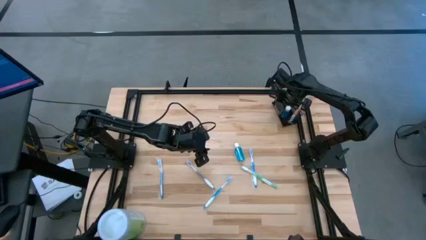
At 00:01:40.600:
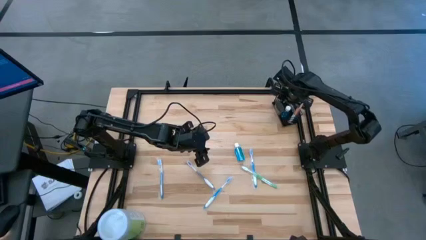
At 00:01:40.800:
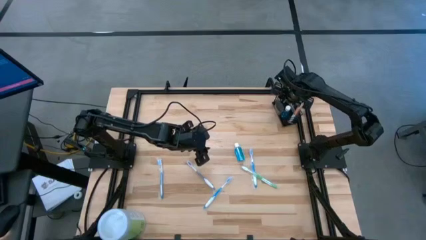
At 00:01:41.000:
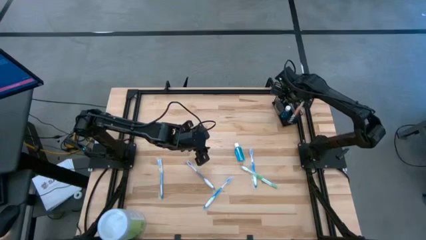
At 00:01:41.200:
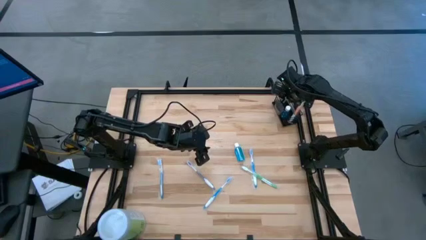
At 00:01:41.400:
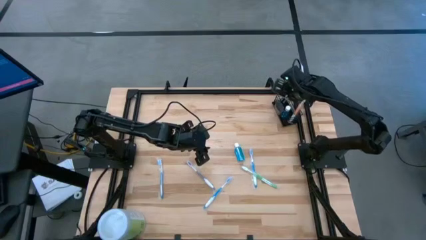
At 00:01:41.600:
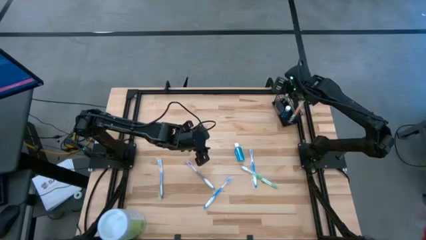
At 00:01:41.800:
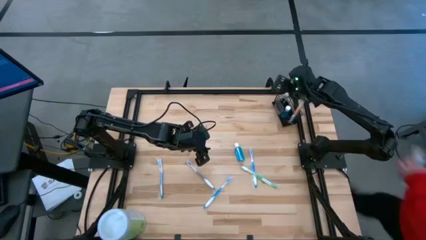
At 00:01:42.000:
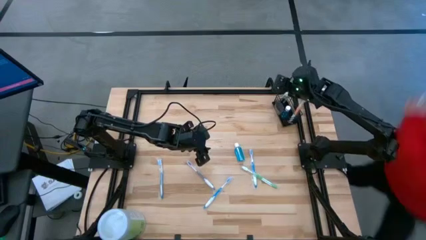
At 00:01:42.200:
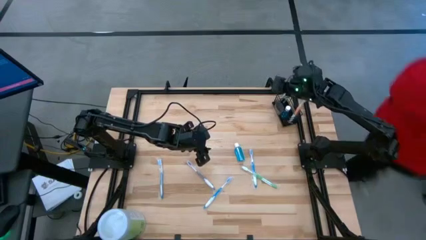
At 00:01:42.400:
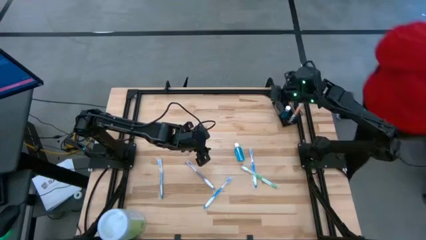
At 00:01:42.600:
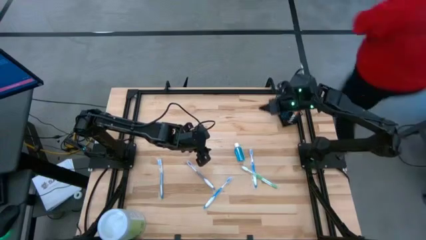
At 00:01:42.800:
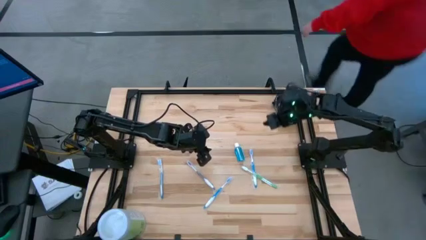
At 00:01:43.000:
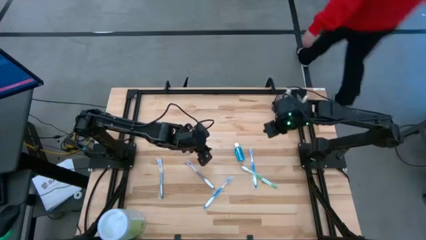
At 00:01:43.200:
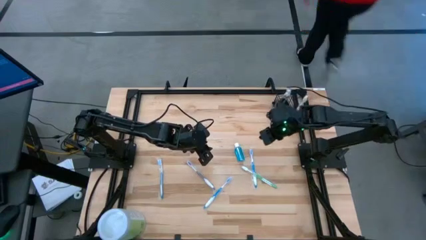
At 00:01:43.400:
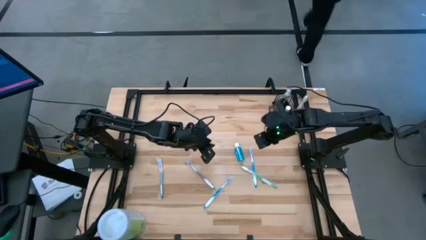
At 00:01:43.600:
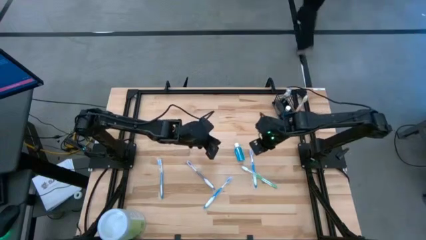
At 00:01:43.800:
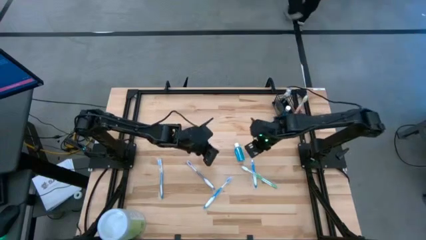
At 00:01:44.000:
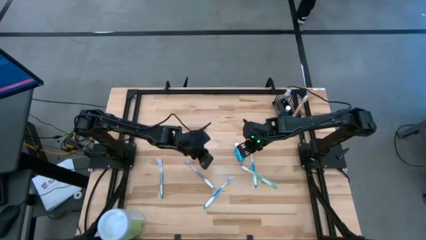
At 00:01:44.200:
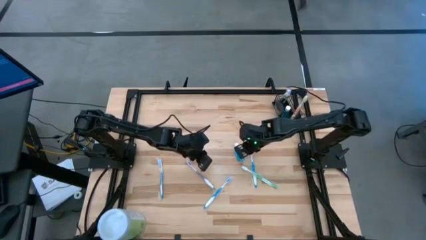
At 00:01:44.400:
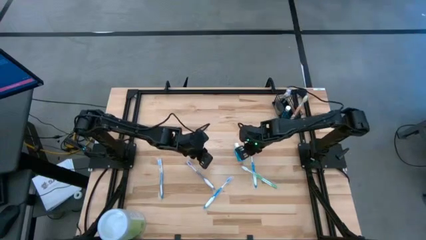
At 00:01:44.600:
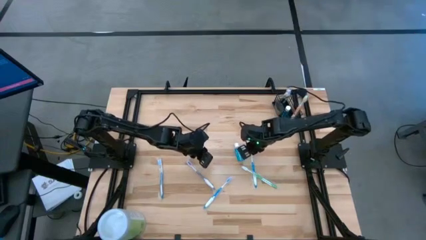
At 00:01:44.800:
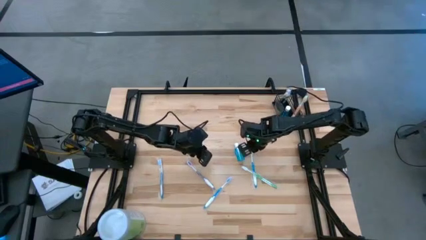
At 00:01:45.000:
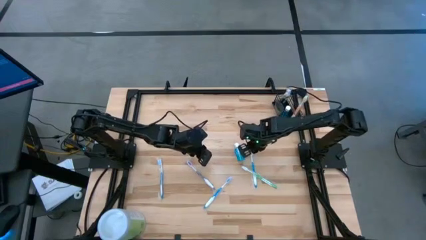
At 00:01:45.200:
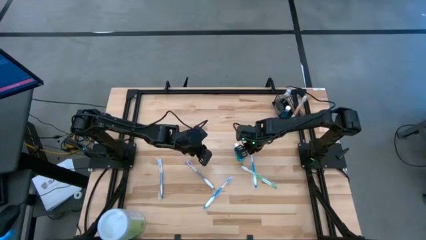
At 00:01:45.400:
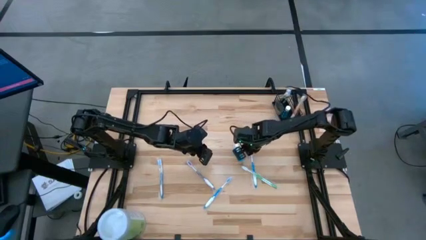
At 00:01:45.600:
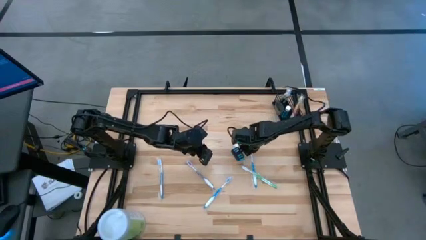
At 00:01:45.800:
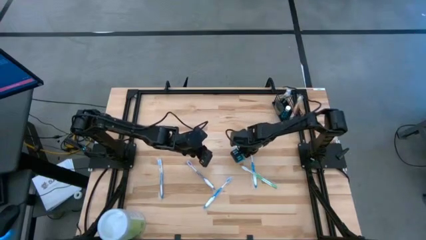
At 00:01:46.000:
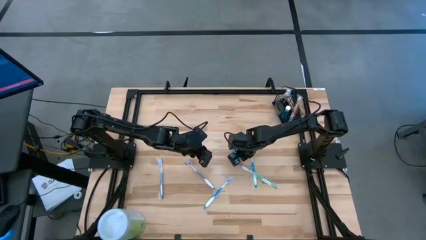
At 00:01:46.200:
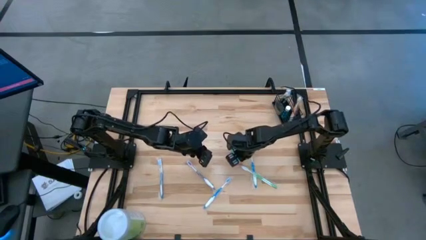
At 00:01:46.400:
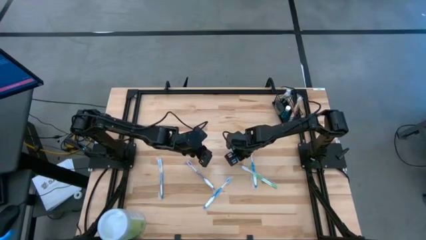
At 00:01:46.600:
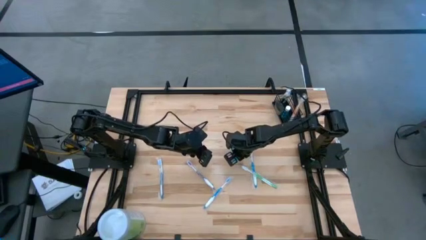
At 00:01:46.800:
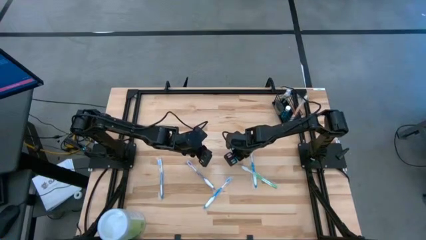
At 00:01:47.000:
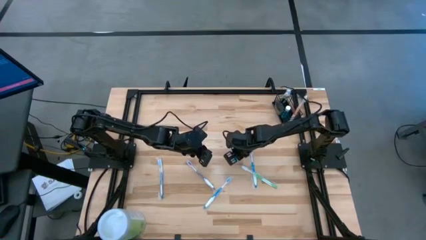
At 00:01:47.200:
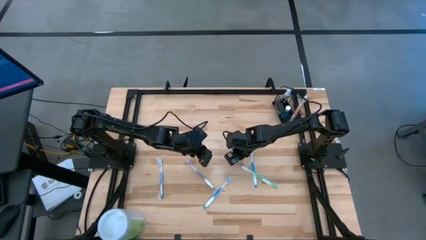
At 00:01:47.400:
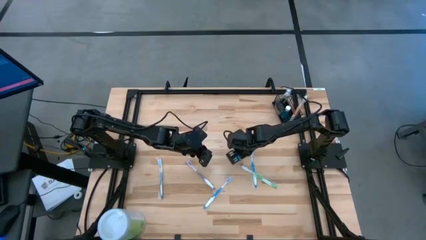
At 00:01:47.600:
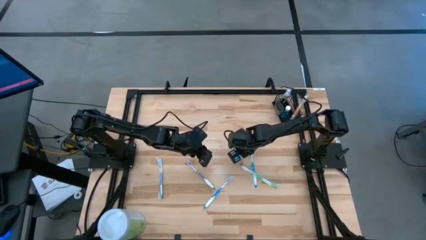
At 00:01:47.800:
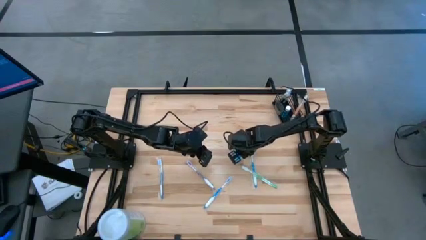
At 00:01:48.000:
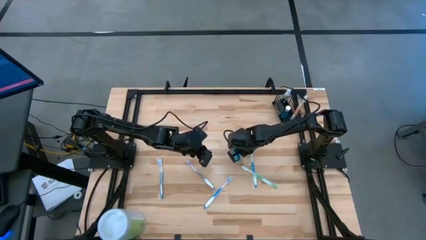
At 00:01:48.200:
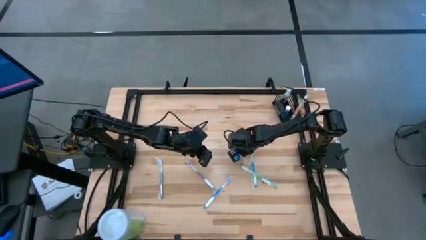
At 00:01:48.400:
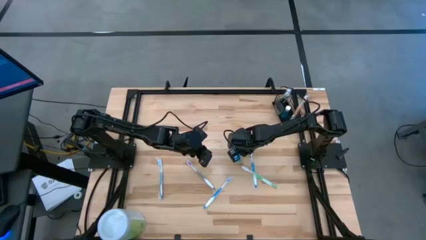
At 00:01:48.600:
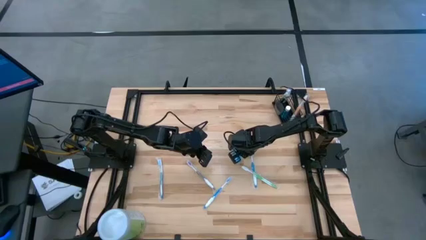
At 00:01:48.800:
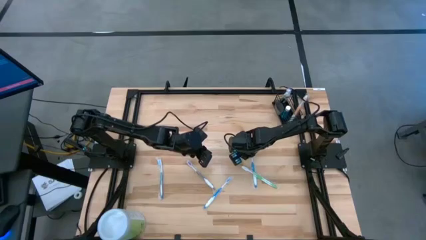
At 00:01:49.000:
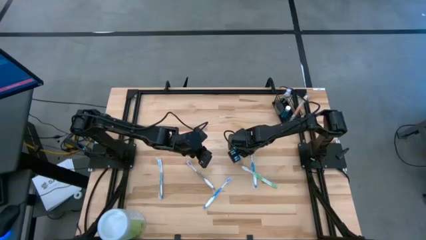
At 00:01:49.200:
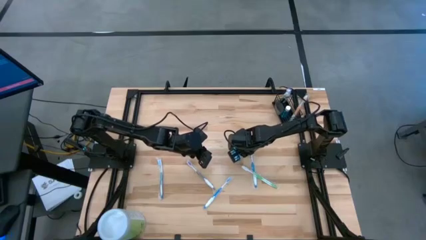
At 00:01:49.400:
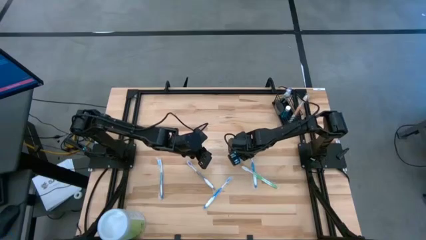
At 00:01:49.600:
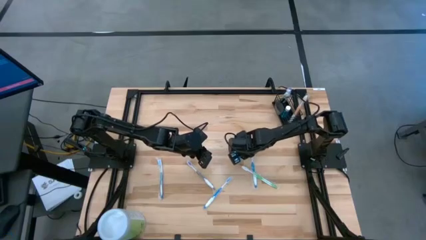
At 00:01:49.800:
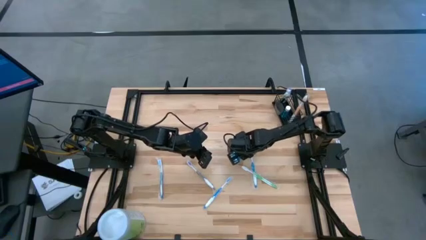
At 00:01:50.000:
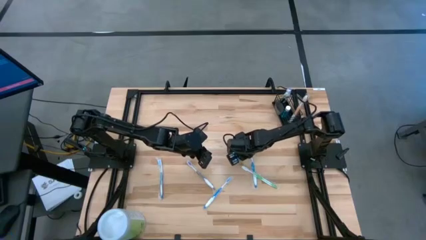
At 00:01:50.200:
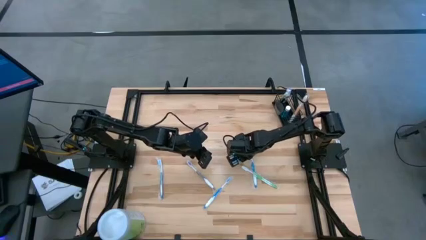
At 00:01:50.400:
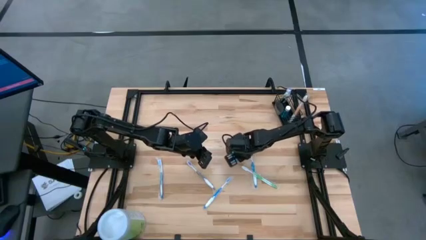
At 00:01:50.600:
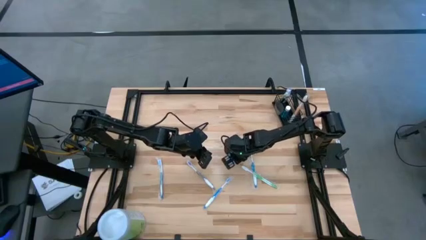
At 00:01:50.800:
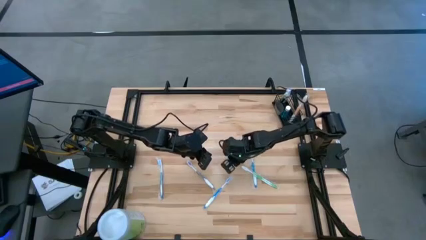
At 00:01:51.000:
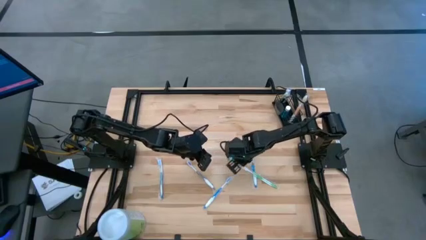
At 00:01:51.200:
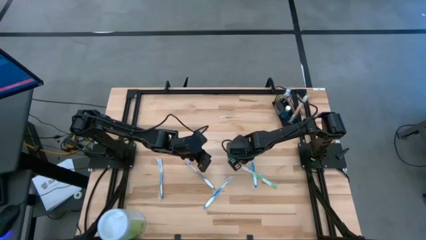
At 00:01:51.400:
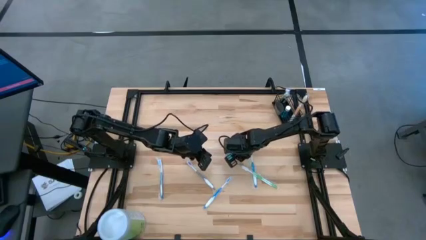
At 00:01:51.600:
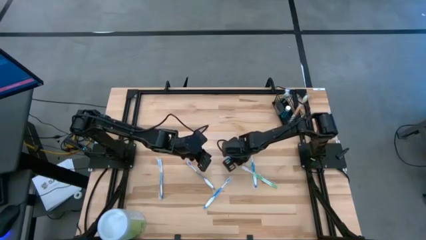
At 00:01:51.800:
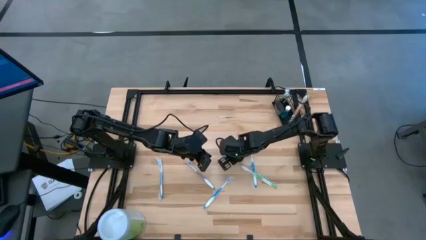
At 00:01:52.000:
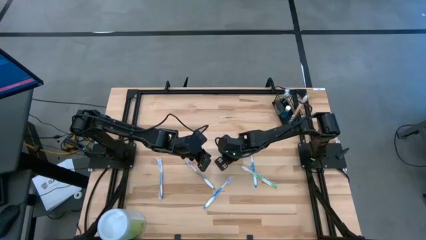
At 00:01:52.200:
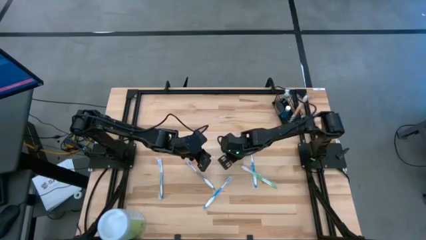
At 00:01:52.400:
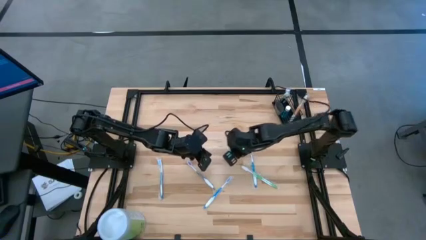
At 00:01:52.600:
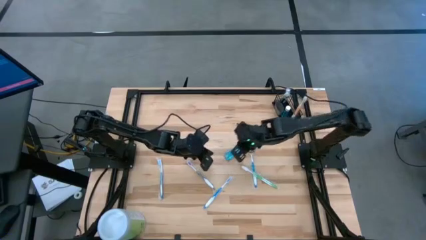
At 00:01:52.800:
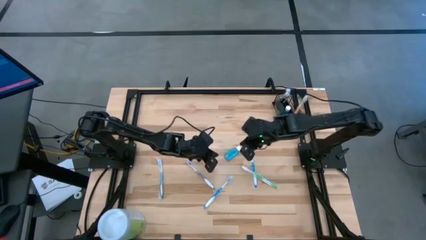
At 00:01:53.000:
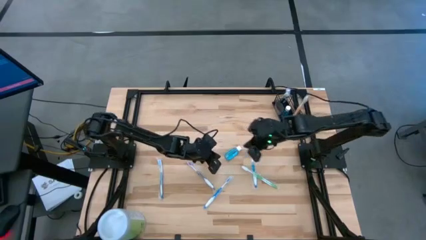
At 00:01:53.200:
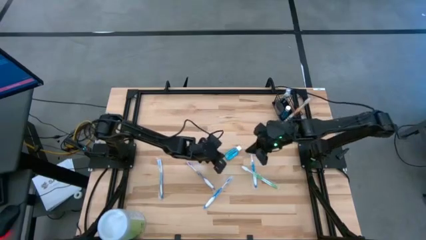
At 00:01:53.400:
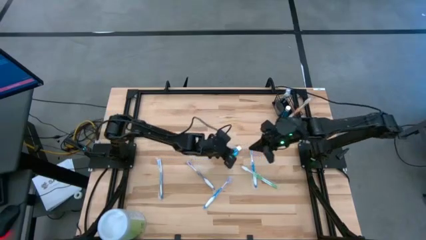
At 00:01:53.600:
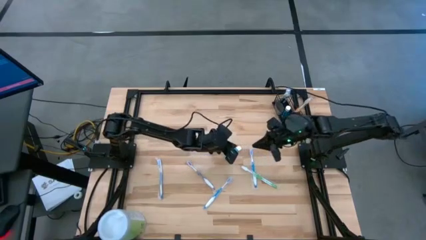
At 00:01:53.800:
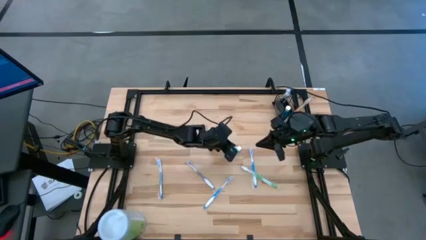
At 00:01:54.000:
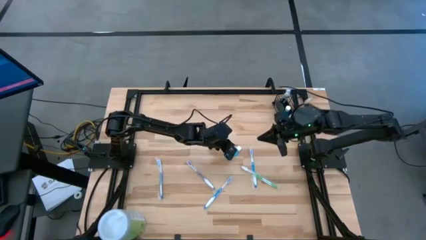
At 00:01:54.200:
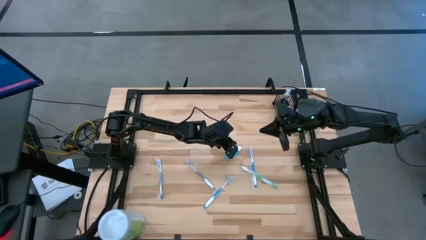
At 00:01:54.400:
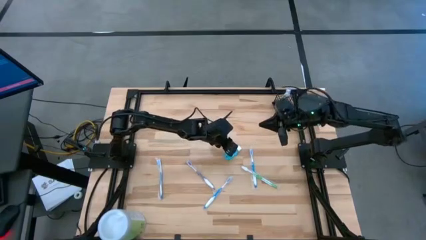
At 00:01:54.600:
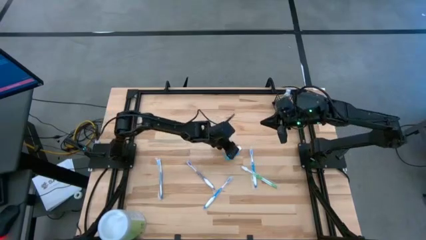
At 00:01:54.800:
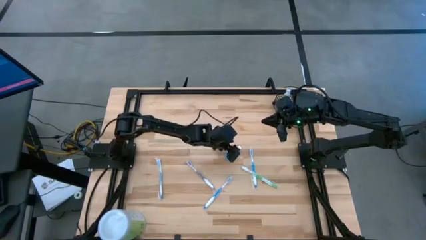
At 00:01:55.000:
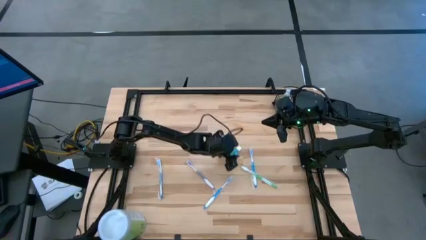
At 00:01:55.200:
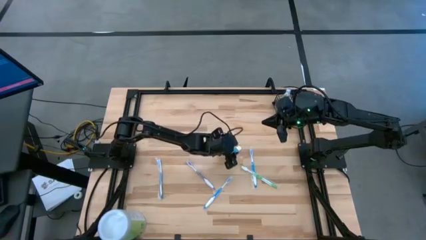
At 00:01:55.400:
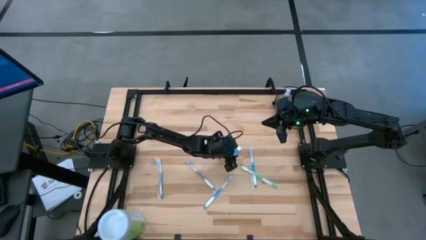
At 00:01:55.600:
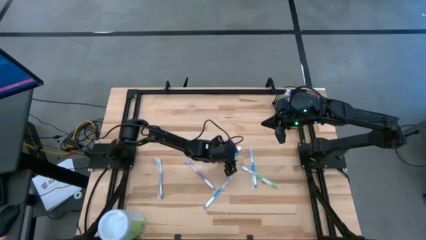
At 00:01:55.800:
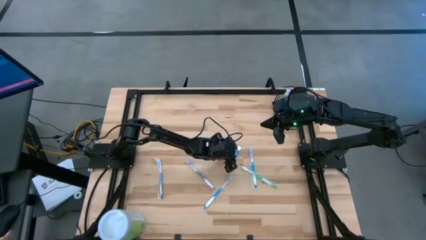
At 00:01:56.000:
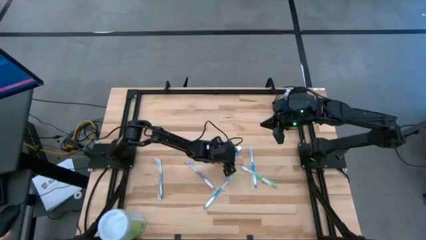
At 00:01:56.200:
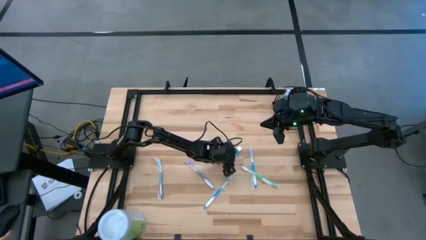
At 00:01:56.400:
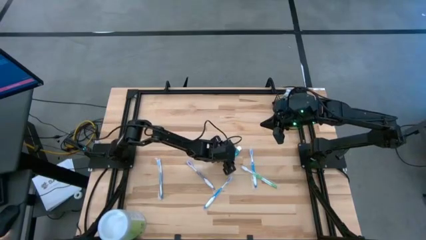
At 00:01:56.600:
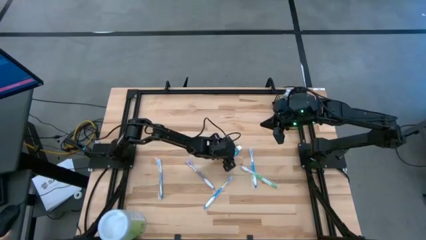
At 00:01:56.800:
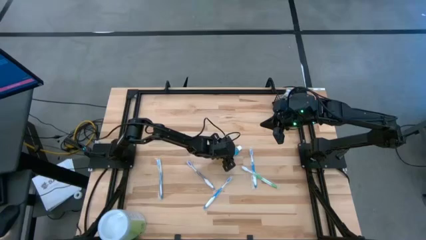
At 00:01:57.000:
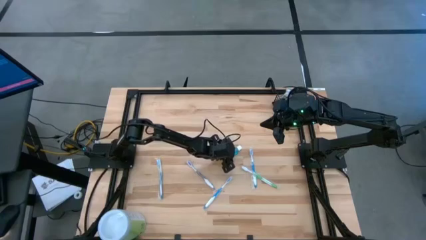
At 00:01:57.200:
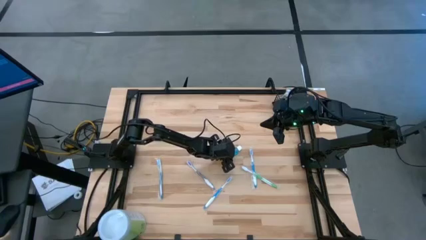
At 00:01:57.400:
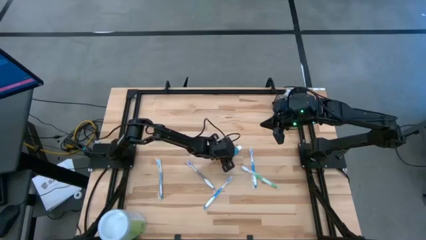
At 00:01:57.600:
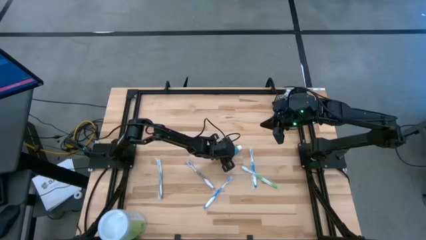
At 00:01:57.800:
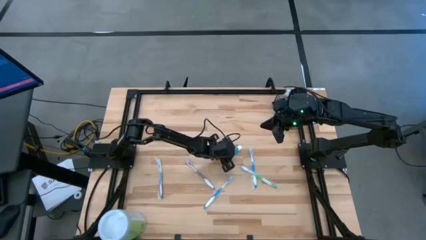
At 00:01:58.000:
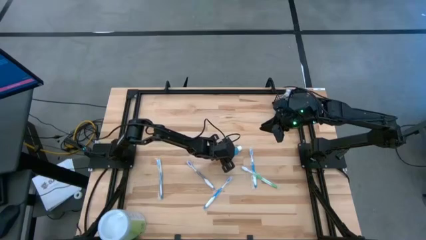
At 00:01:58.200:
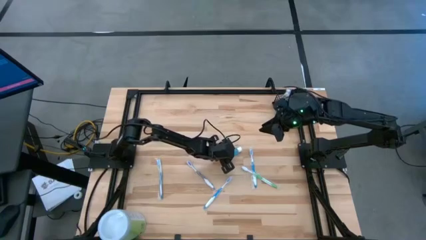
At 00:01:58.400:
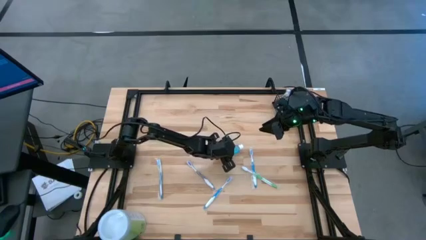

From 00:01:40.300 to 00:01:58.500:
Task: Pick & Place toothbrushing station
Put the mouthwash in the middle section of wire organizer
